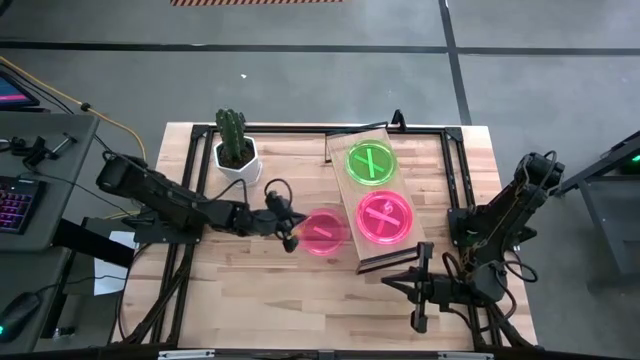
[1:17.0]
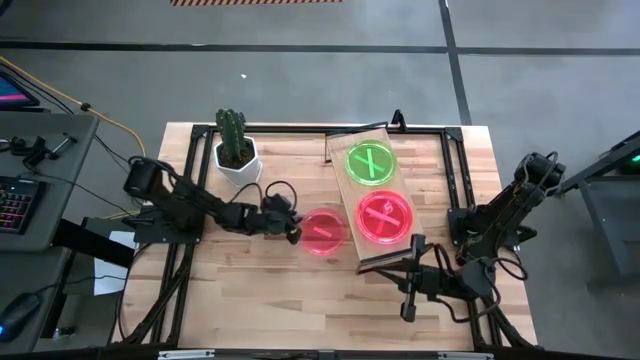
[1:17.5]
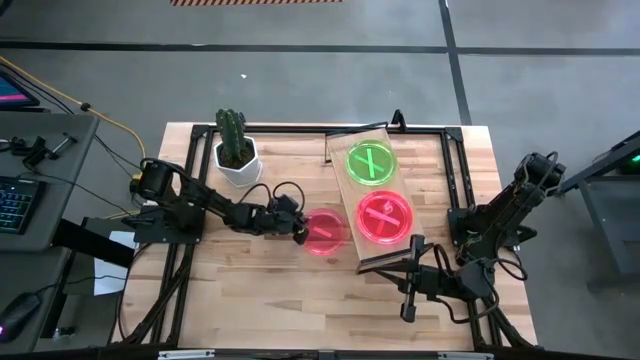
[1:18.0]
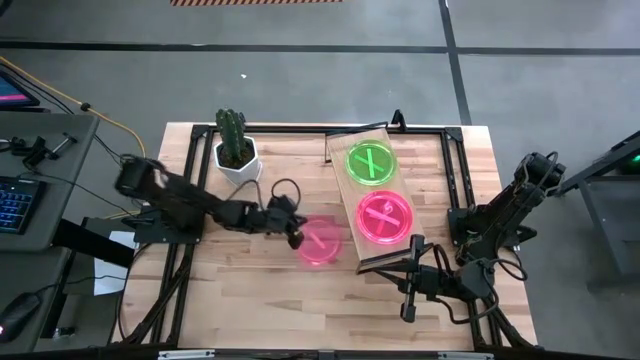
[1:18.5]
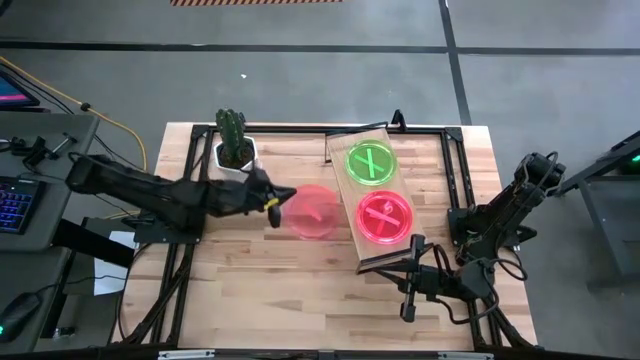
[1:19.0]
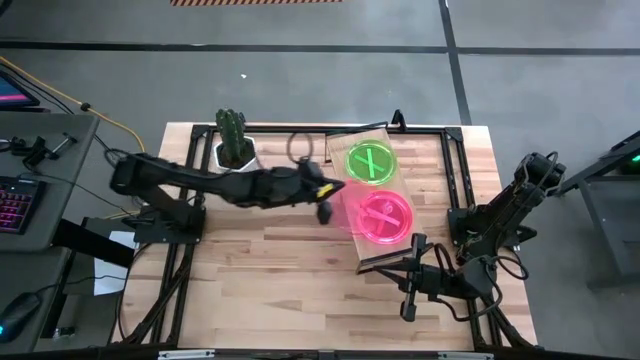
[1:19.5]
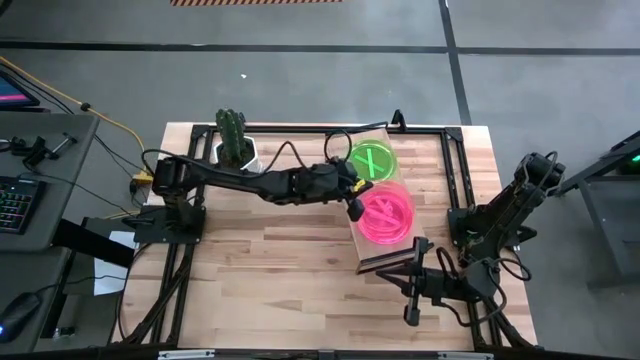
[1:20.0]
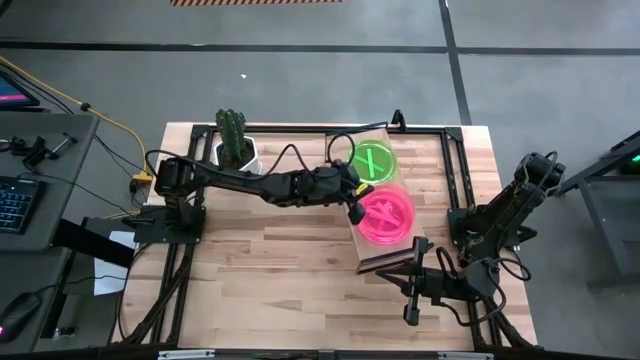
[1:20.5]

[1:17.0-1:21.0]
Task: Place and stack plates onto a shelf
Stack the pink plate on top of the other pink plate on the shelf

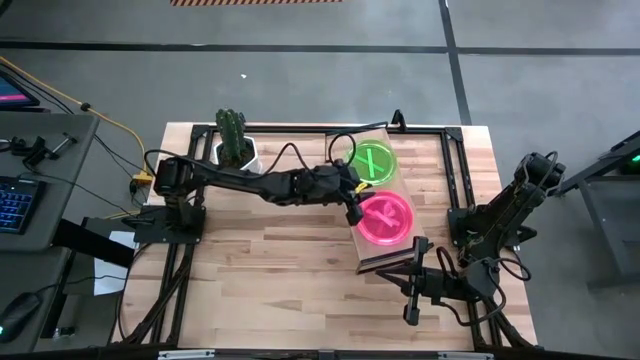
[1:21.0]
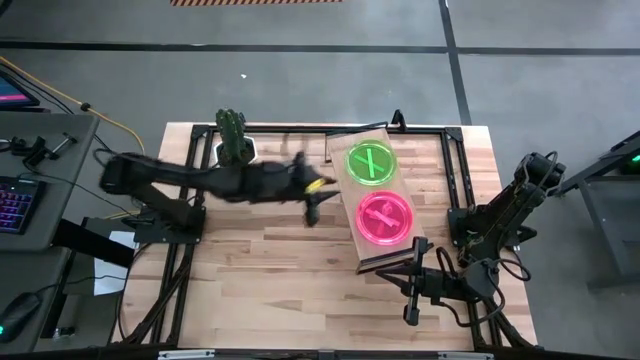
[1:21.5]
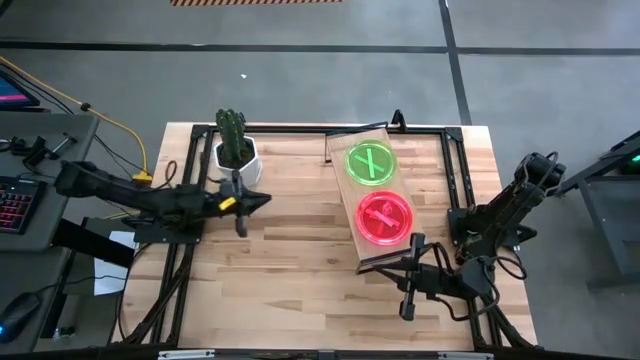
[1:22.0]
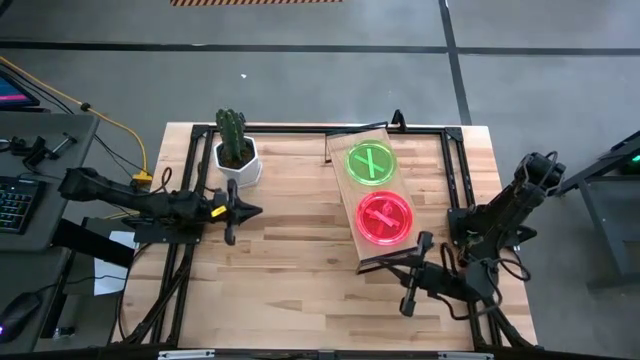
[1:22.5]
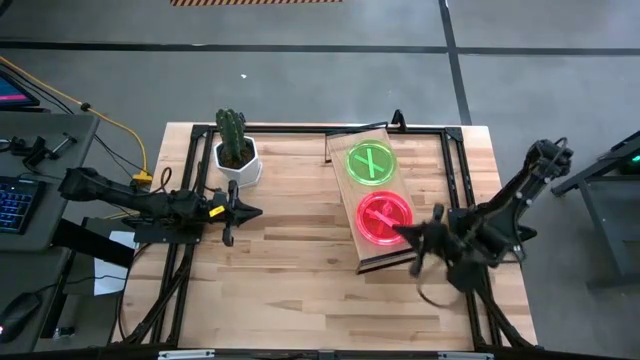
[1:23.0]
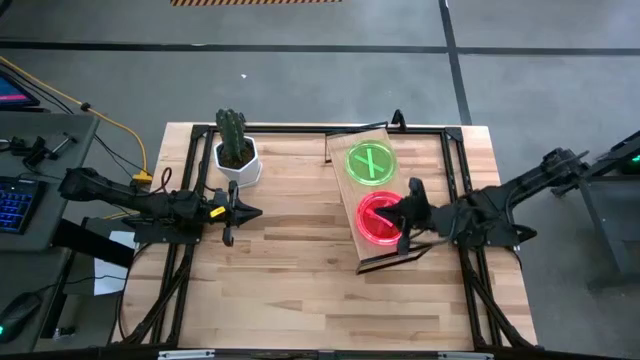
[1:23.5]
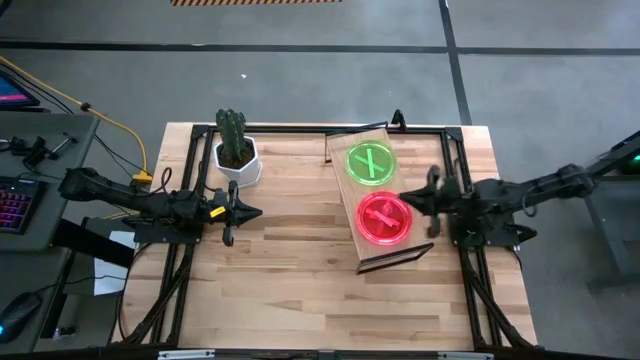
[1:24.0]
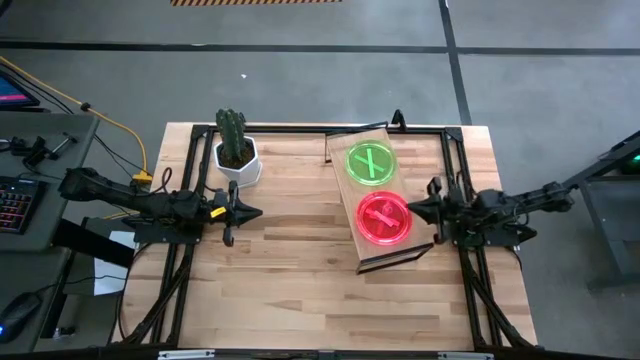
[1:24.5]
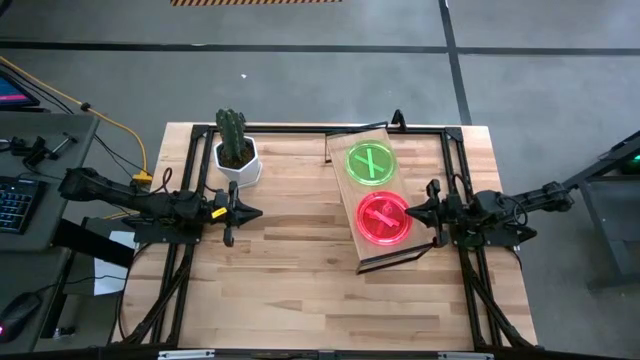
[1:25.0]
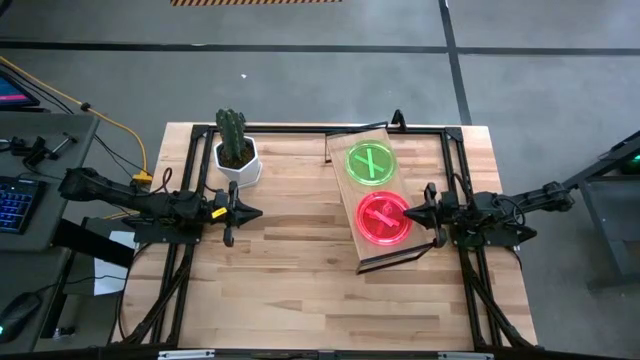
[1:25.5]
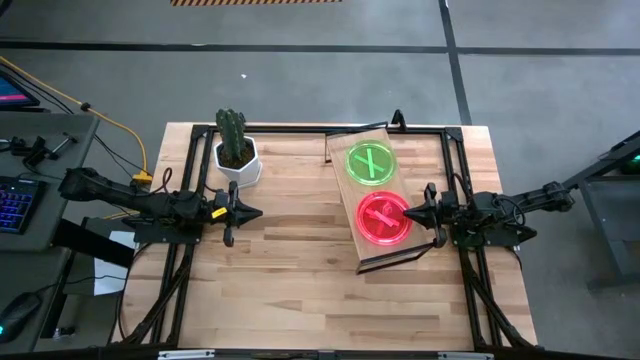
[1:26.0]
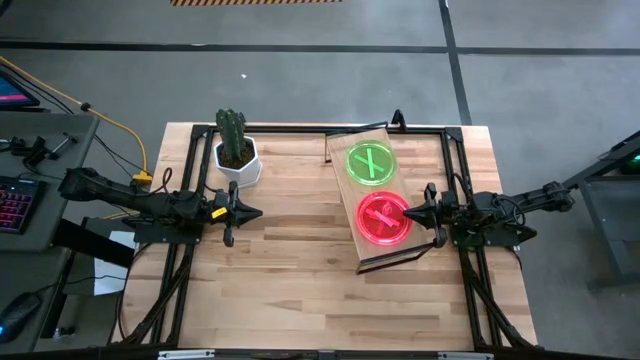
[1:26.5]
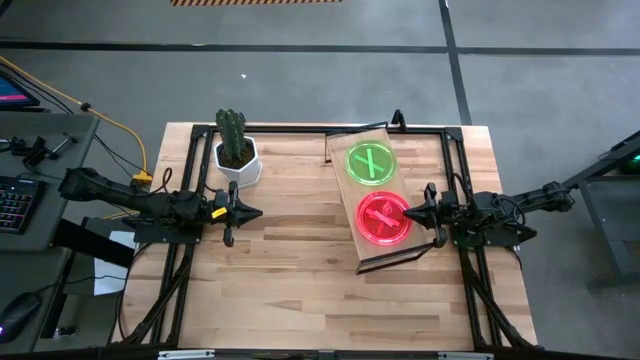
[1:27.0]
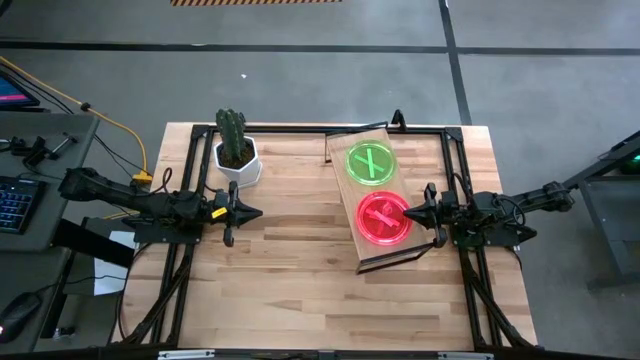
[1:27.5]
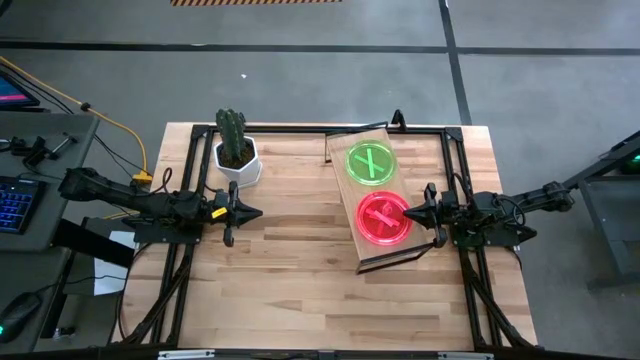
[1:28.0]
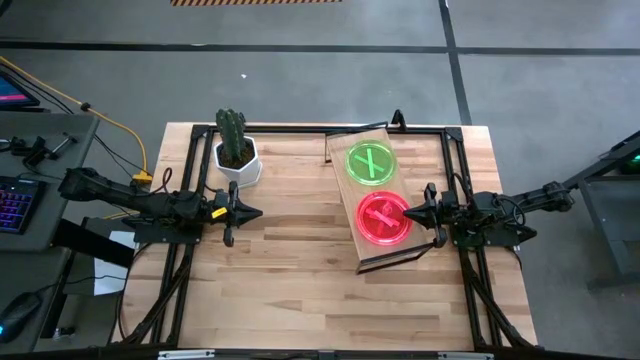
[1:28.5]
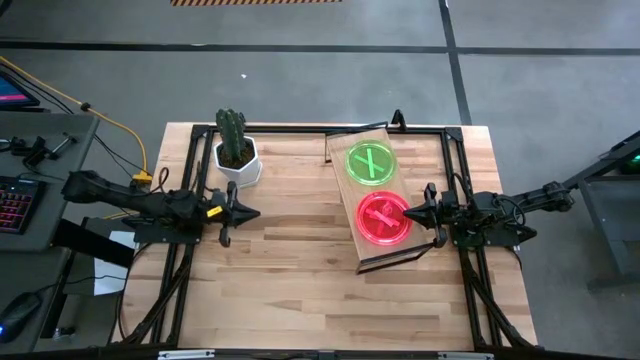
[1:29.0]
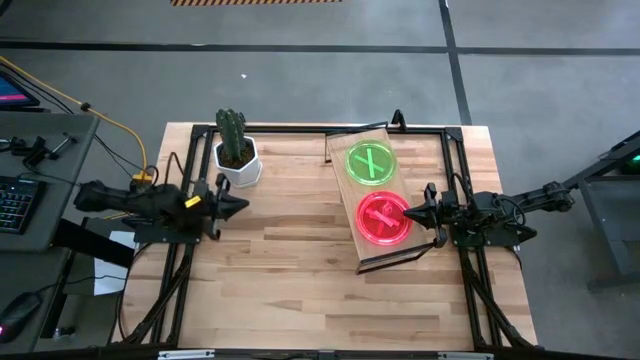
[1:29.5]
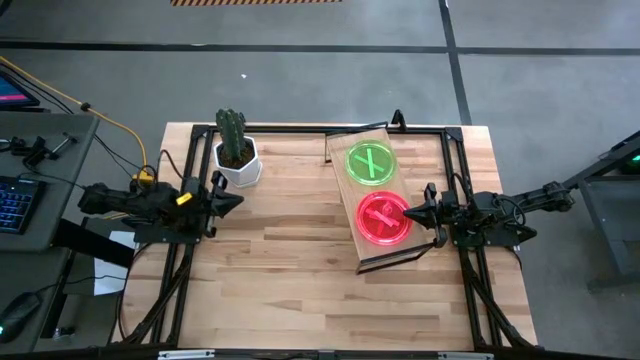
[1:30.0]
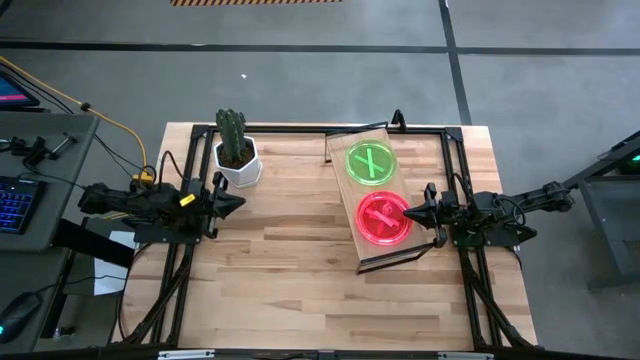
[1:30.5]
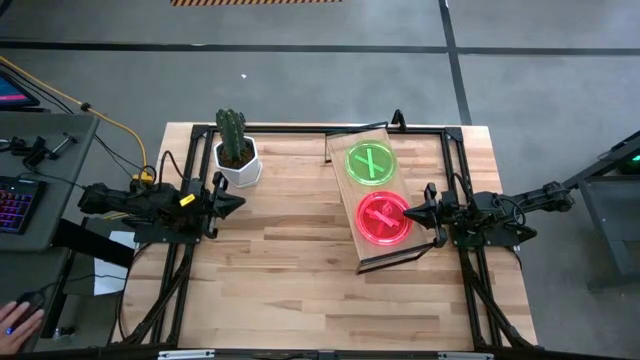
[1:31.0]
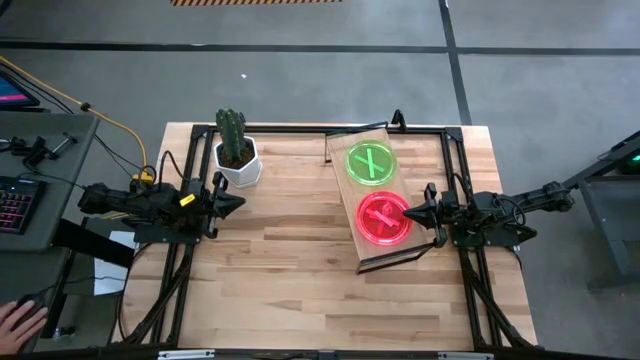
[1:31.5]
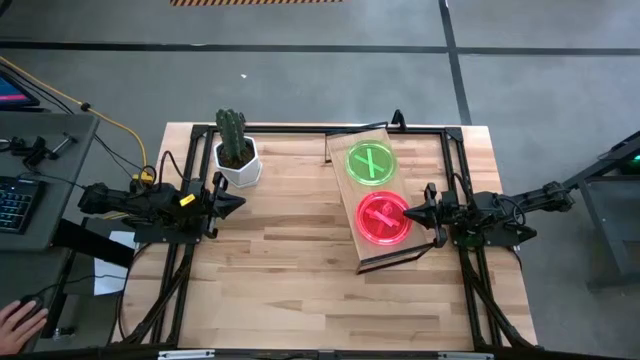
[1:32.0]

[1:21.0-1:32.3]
Return to Home Position

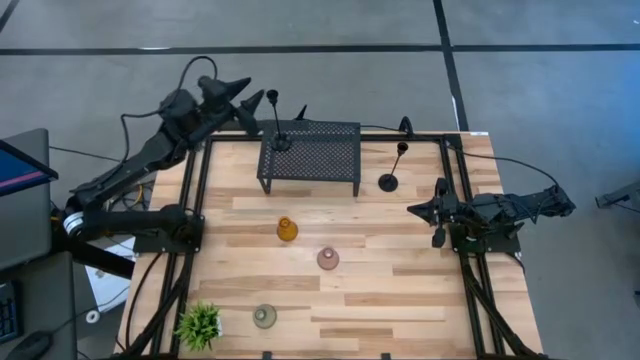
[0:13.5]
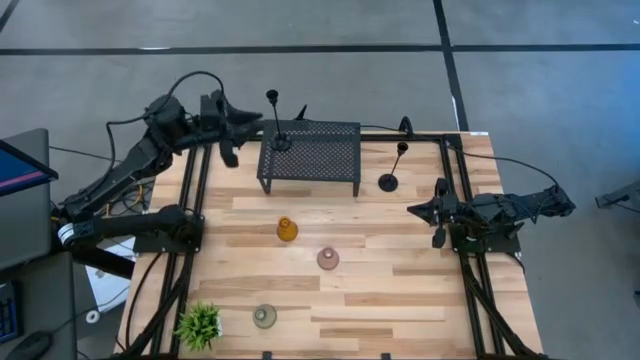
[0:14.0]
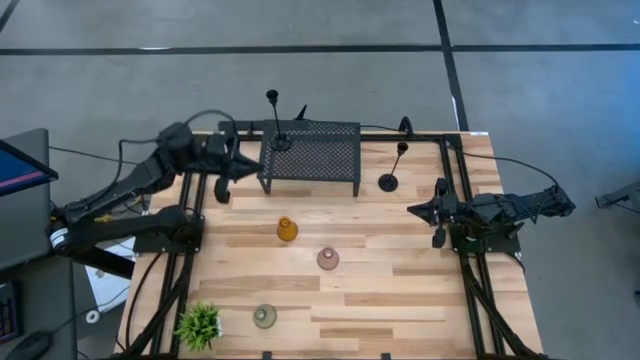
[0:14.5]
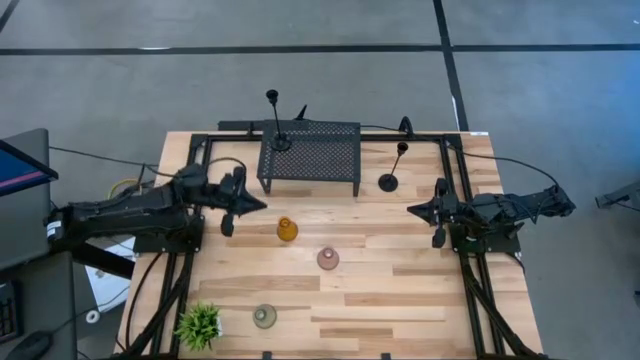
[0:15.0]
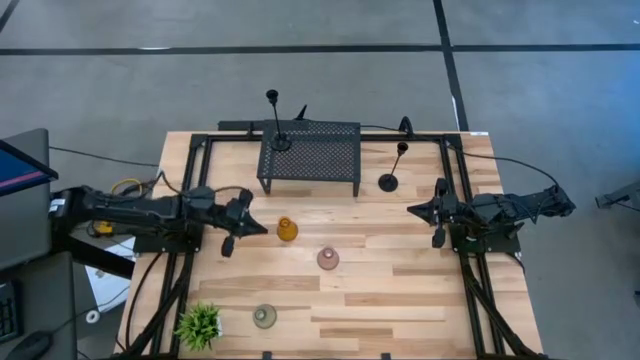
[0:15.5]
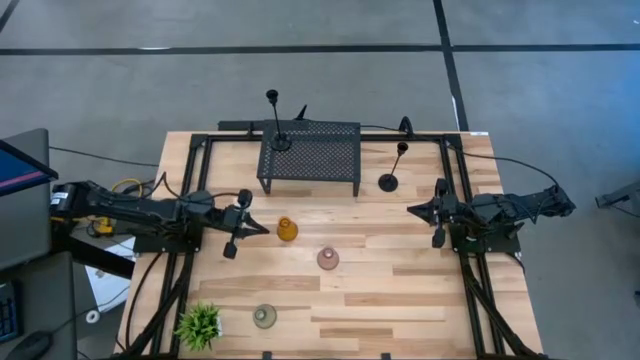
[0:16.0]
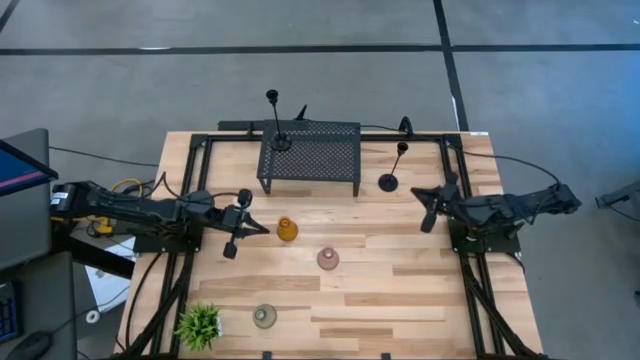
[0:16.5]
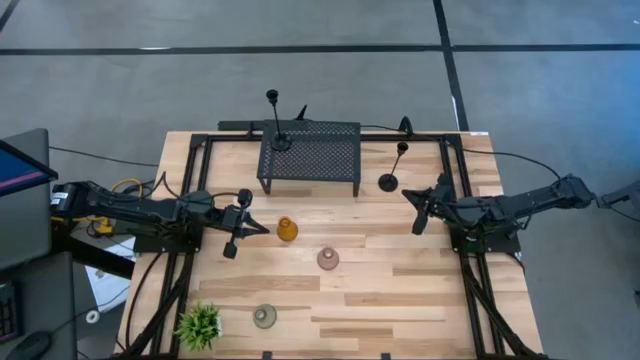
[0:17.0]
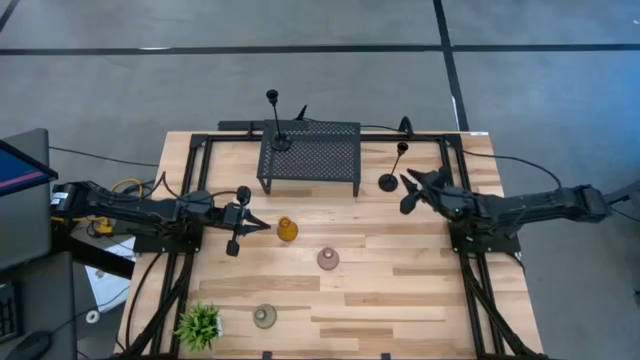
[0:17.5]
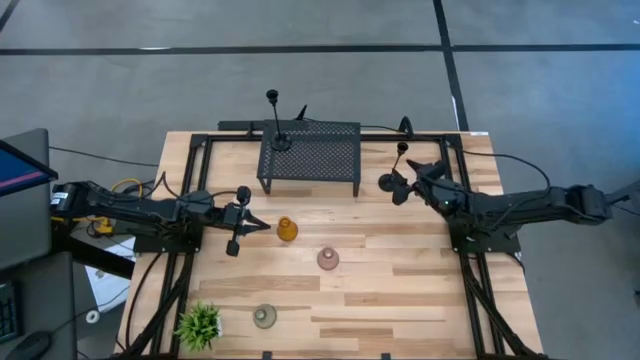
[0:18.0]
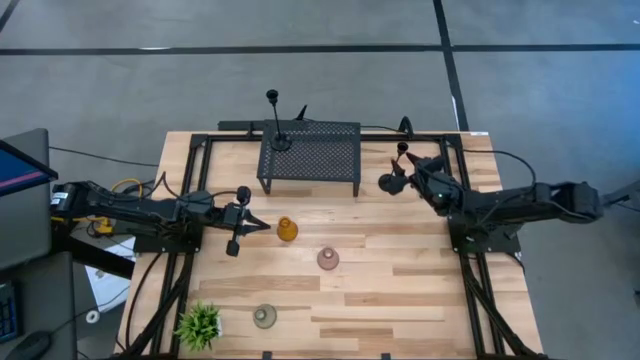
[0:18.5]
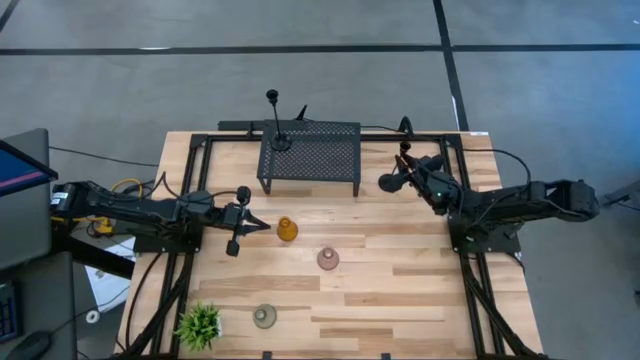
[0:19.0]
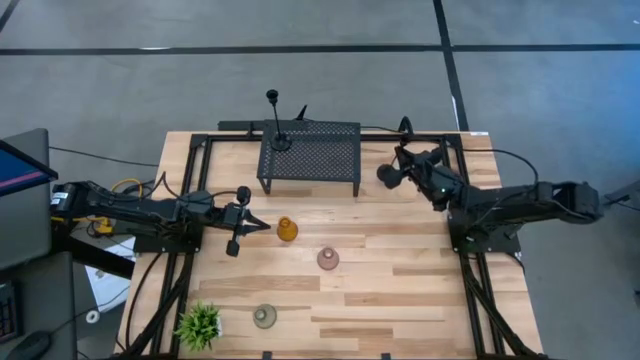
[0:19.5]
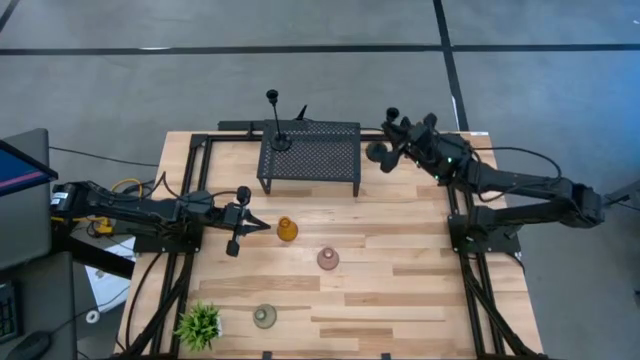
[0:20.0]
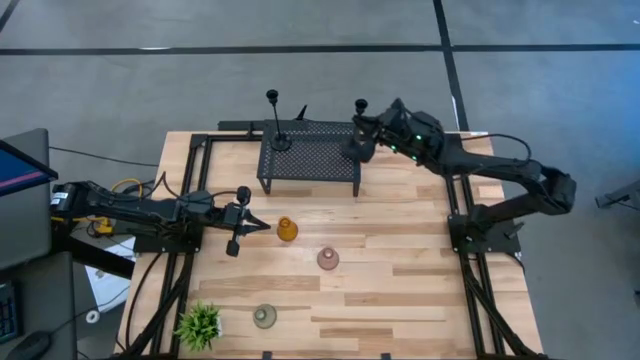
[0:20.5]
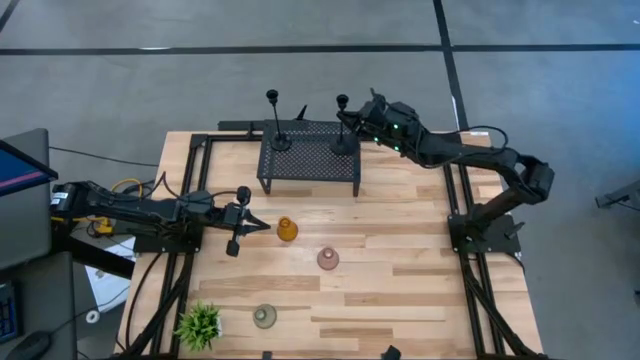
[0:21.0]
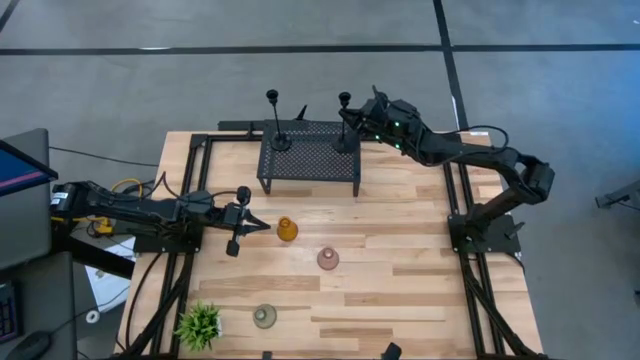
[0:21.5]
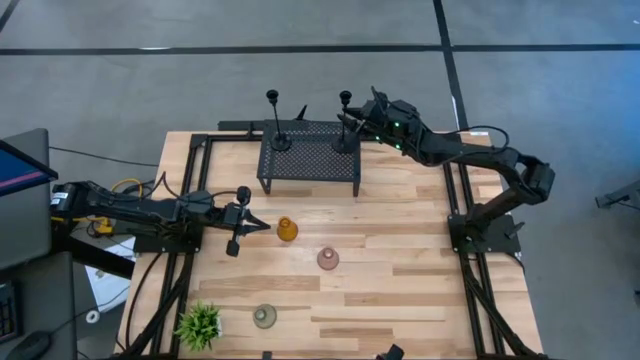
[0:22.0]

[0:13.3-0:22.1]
Task: Pick & Place candle stick holders
Put the black candle holder on the shelf
